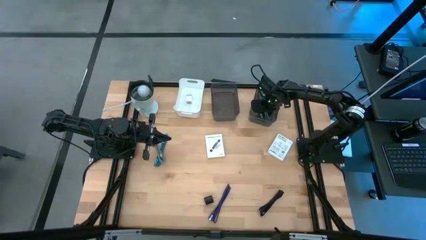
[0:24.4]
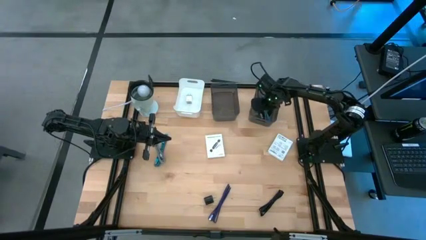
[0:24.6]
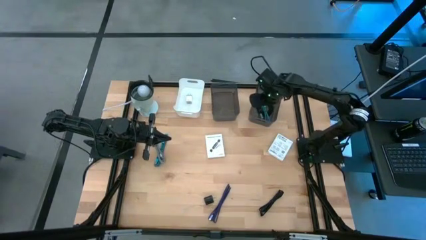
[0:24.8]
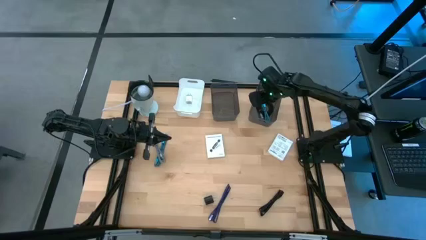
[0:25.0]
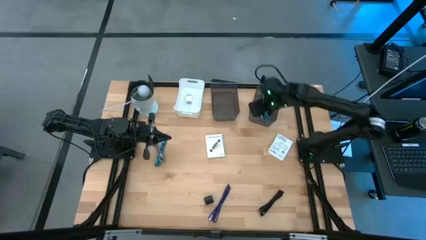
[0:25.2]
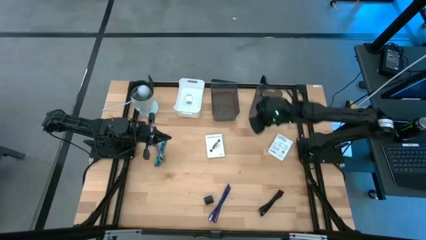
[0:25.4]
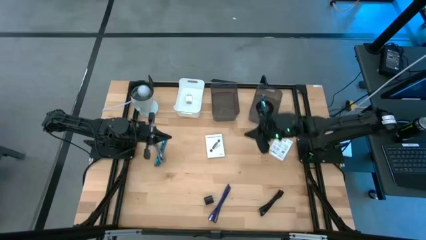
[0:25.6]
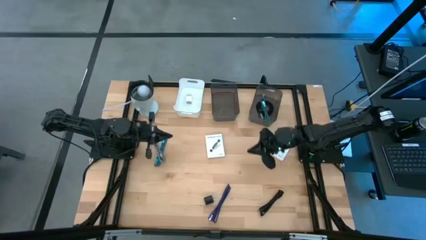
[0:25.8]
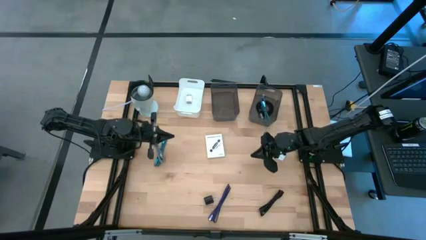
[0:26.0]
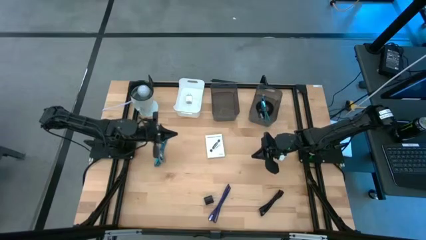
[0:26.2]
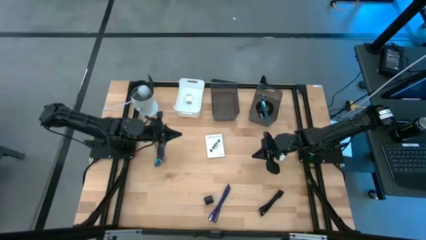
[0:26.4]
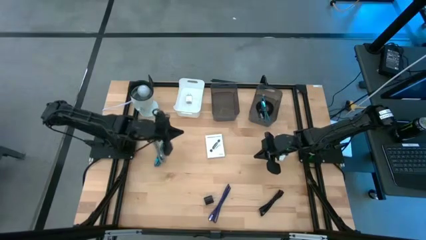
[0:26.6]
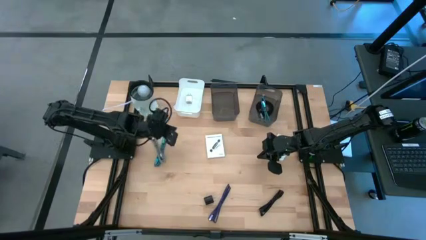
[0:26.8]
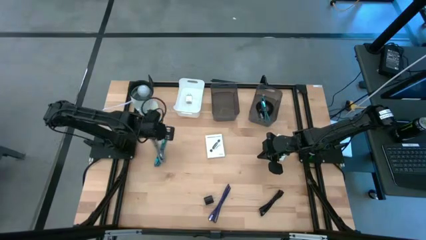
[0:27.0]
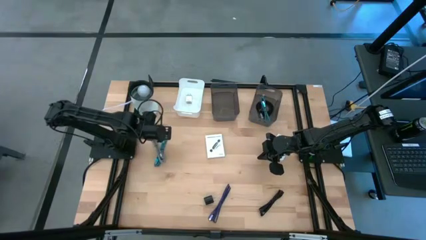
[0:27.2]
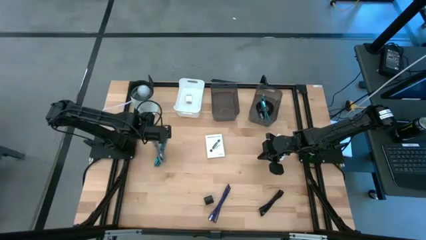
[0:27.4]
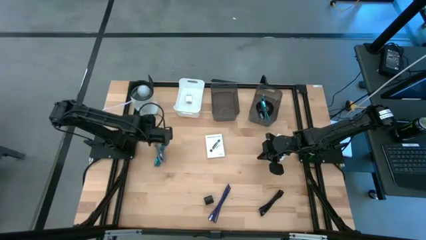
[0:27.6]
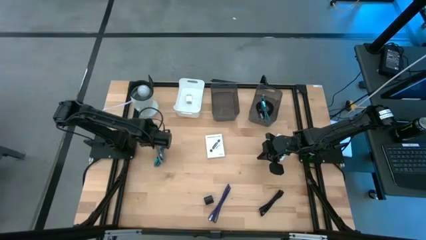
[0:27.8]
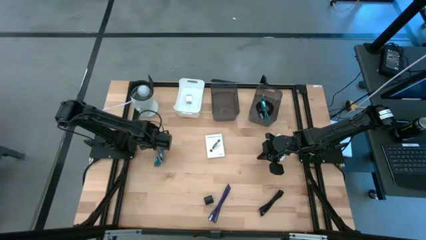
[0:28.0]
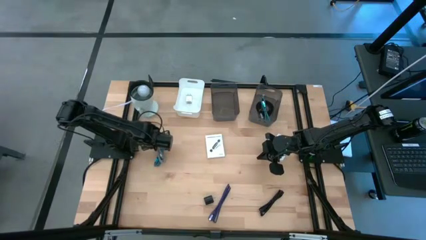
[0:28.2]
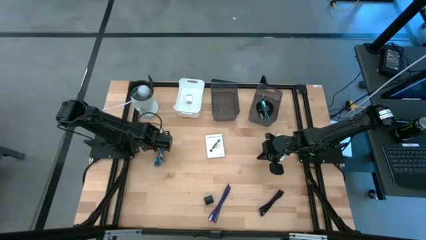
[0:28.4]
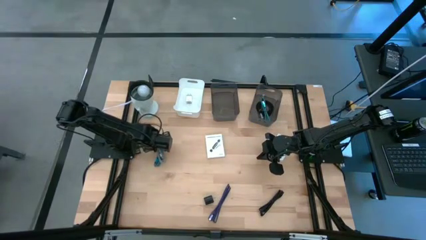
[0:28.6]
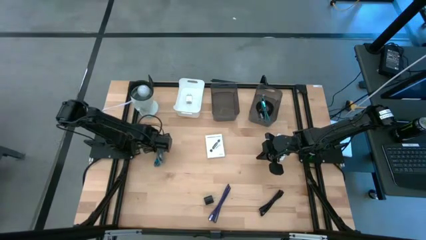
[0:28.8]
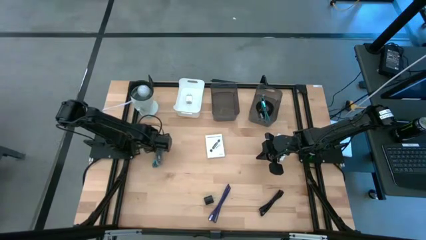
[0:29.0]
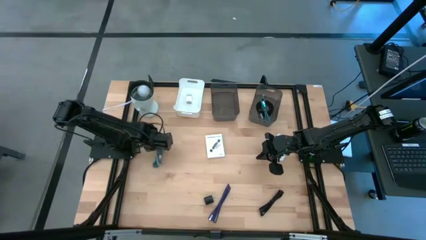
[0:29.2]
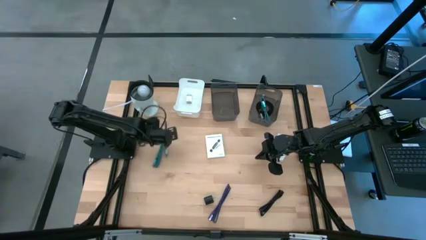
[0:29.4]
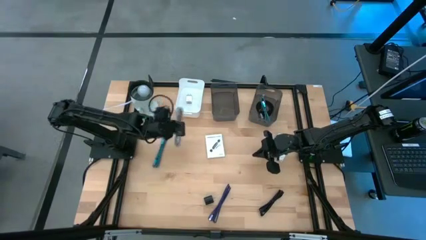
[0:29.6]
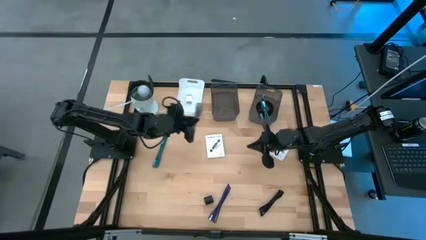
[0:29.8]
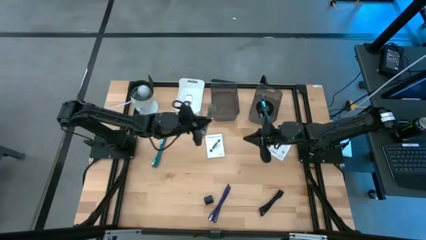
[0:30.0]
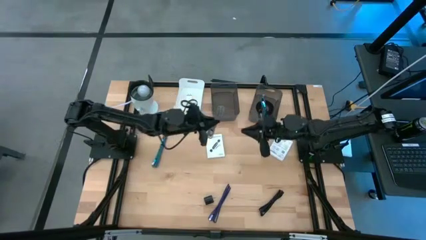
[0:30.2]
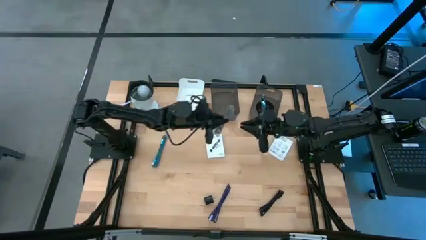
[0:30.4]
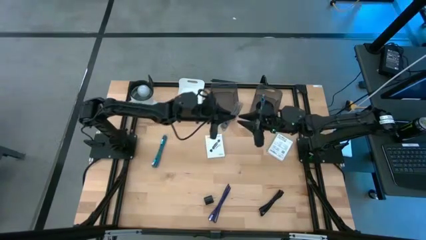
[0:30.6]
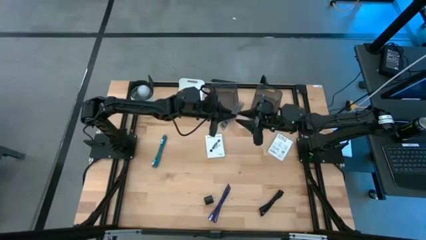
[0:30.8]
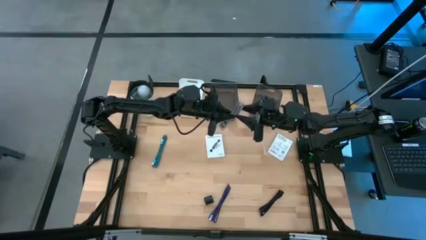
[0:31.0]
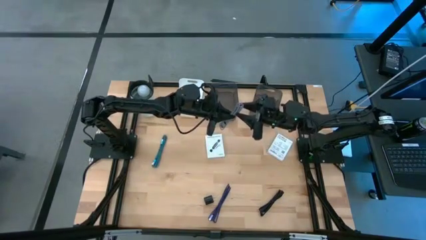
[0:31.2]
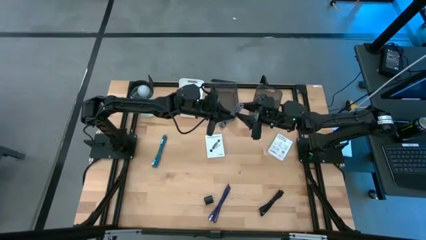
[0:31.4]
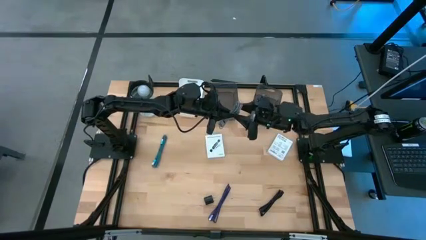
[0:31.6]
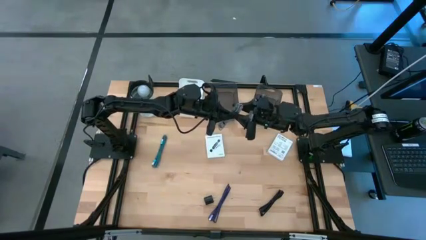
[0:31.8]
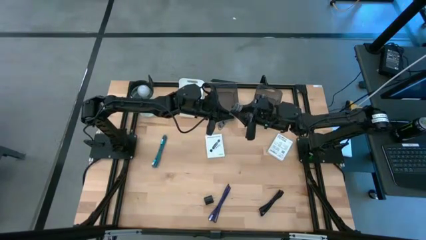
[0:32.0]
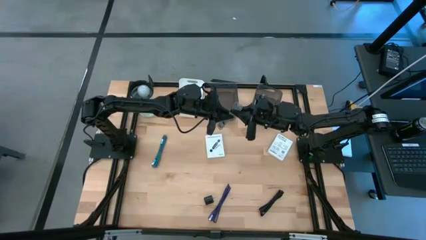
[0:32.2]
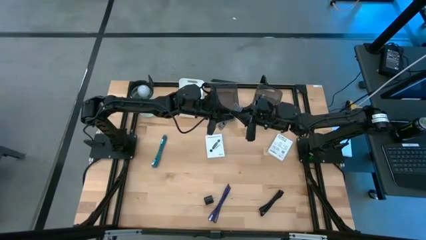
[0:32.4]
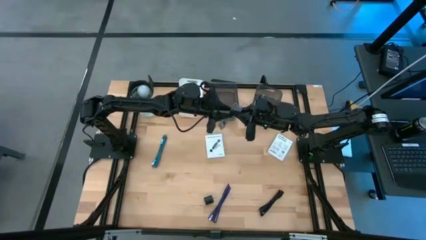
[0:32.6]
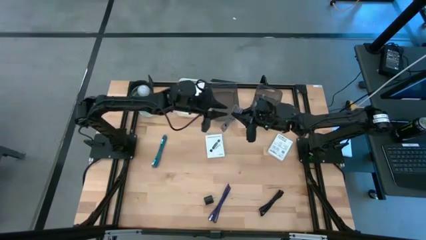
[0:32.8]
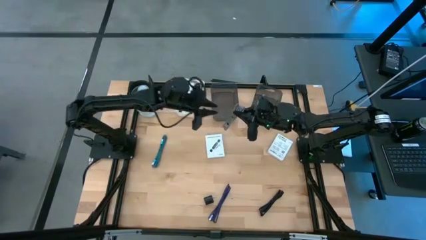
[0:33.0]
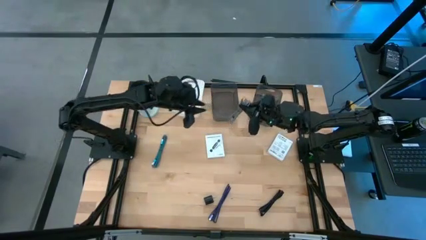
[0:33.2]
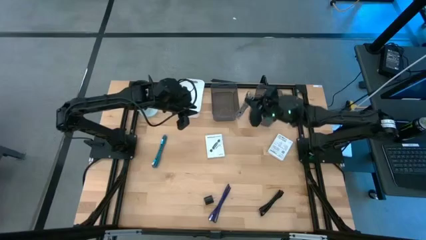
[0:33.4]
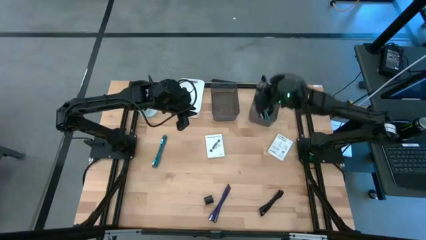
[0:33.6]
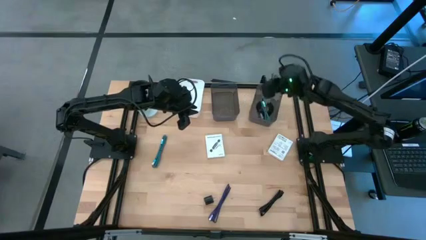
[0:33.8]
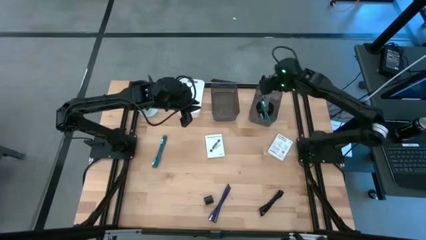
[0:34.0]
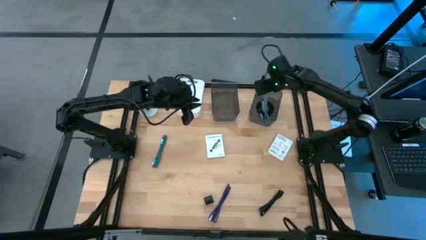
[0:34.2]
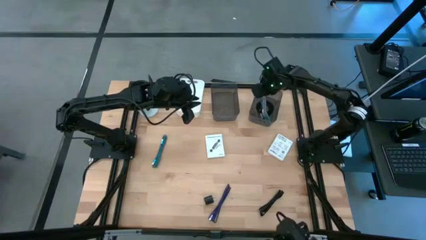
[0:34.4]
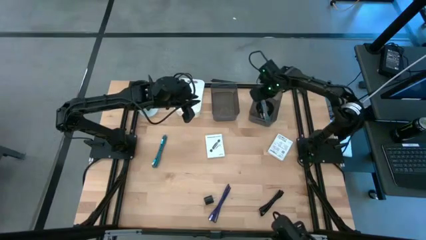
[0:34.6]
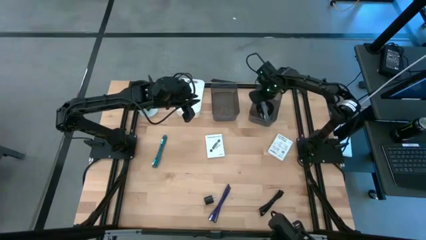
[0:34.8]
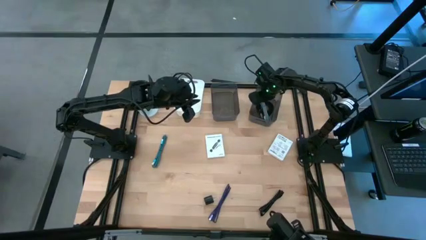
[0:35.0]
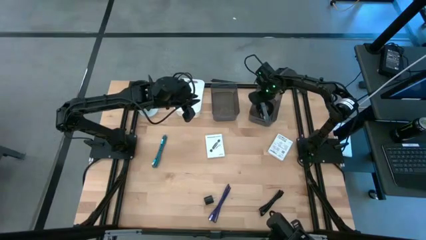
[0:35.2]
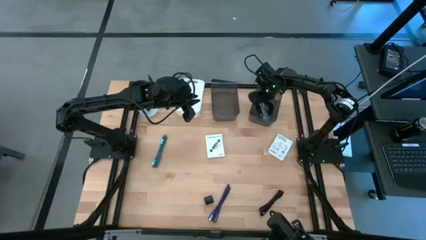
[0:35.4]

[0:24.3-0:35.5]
Task: Pick and place items into bin
Put the gray charger cable into the right black bin

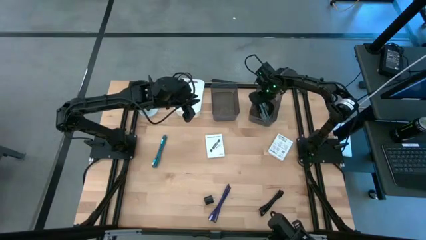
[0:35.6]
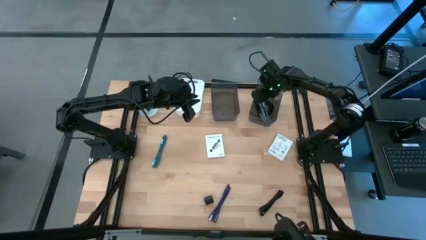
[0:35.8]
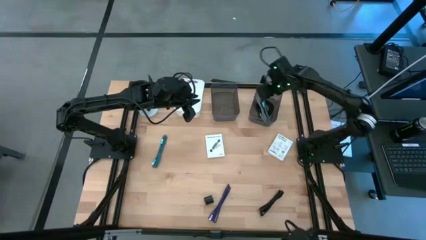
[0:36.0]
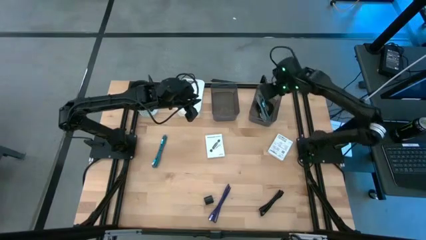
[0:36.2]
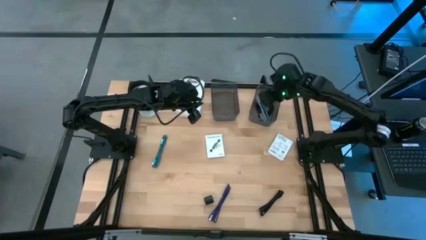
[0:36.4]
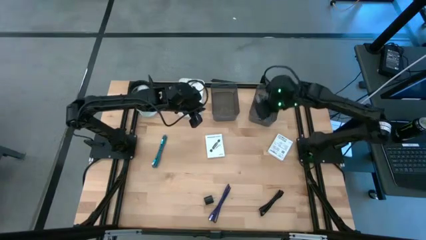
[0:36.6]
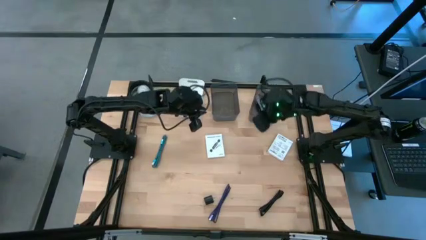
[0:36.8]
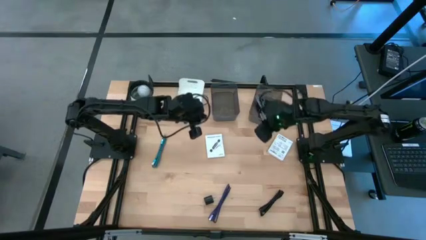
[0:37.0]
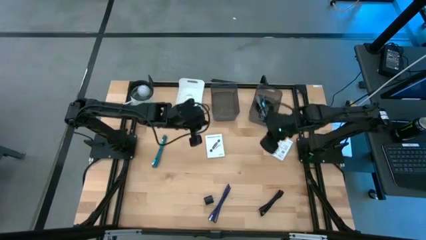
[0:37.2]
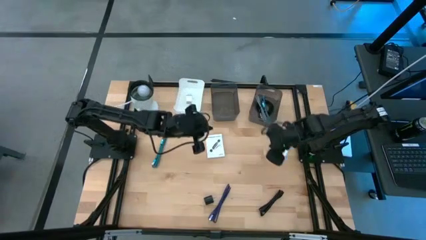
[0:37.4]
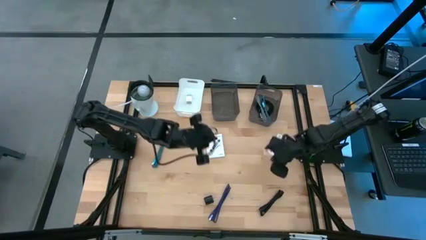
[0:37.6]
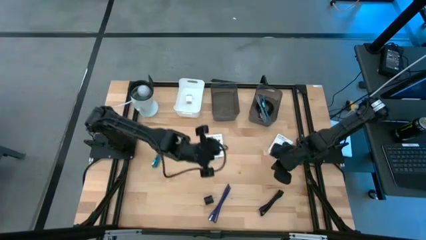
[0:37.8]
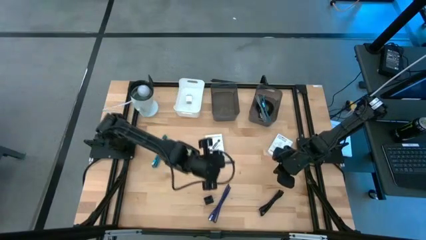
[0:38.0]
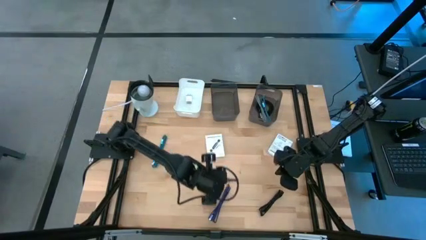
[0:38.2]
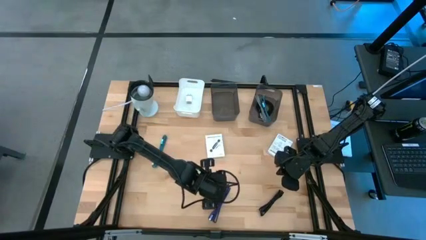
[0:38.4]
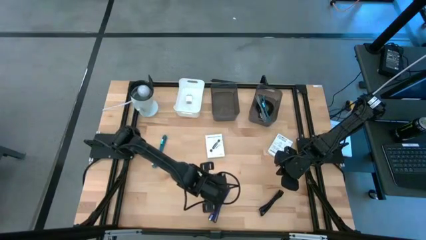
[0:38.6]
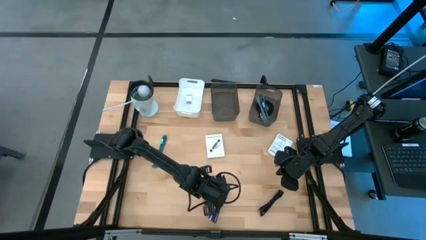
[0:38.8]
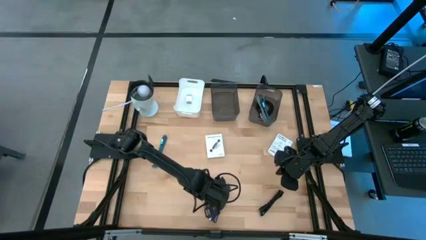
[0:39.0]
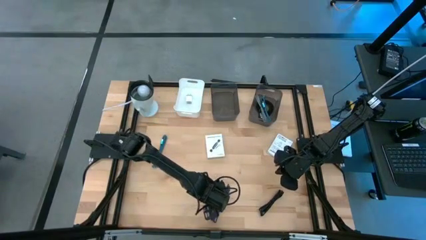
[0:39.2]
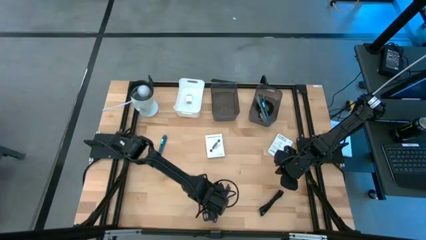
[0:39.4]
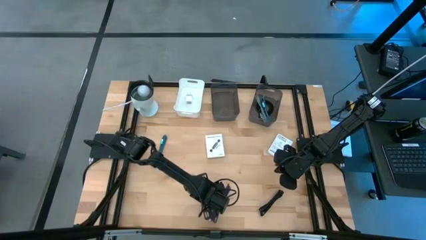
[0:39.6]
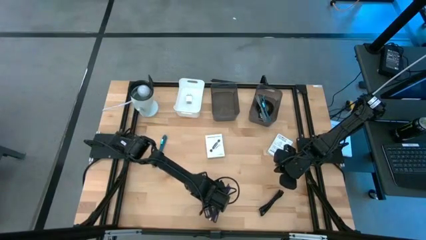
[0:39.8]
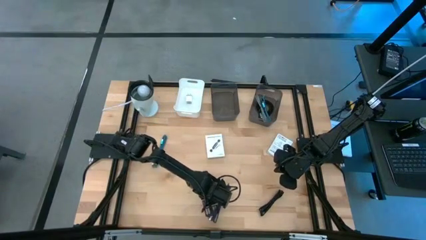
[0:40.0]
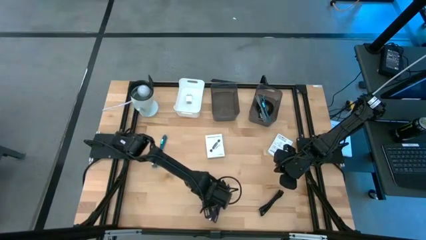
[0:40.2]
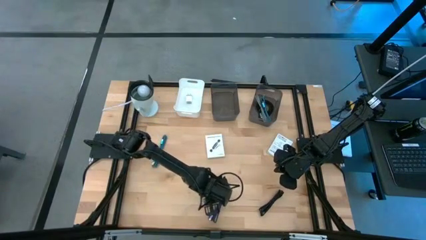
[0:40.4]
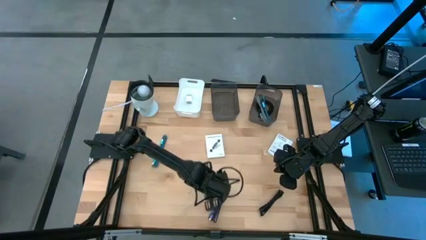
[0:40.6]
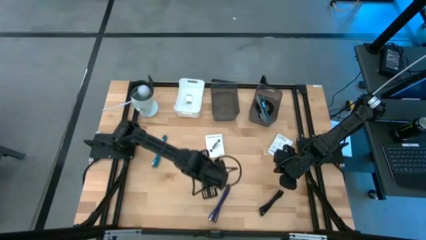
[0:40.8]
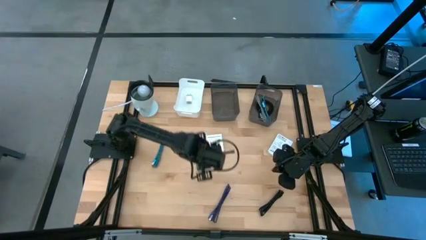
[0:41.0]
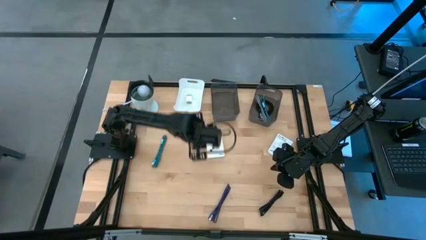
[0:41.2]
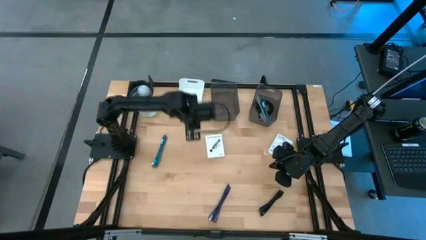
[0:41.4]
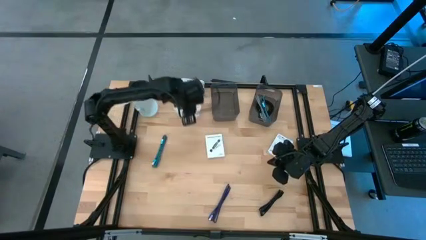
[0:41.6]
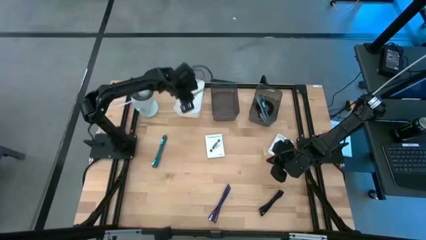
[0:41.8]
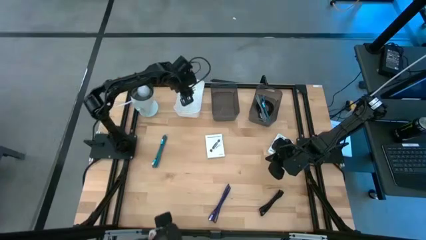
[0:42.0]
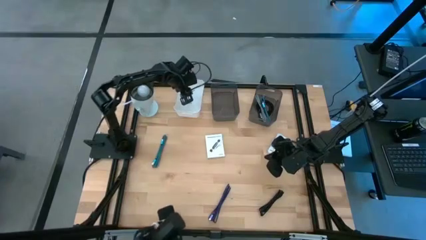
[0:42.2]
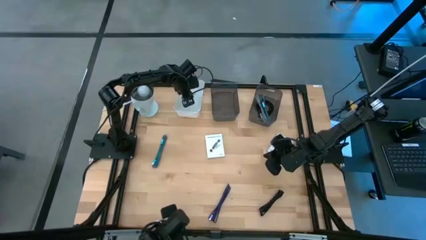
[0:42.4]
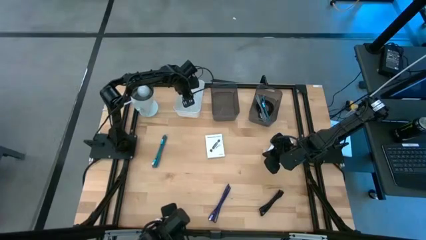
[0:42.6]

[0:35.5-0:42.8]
Put the black charger adapter into the white bin
